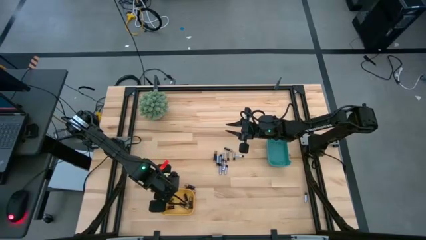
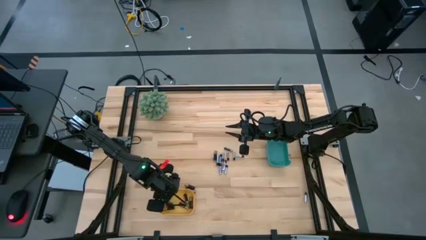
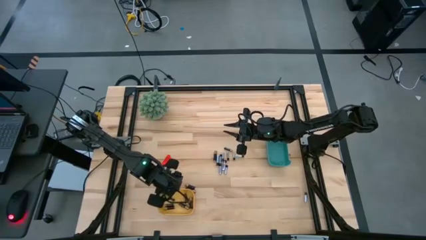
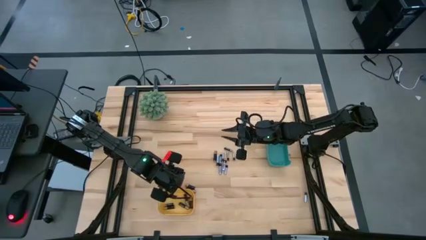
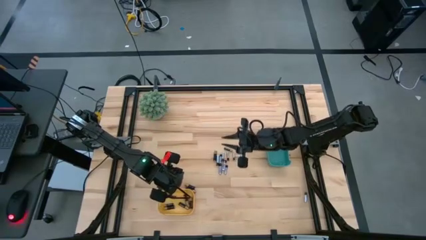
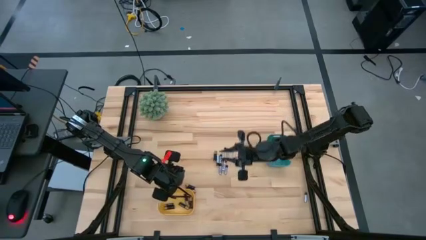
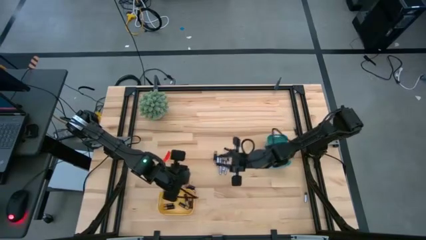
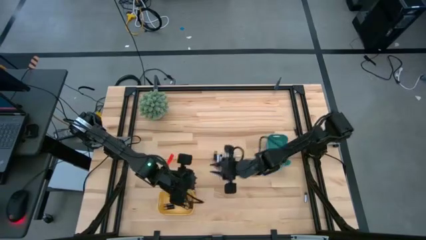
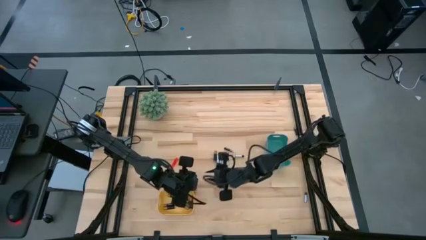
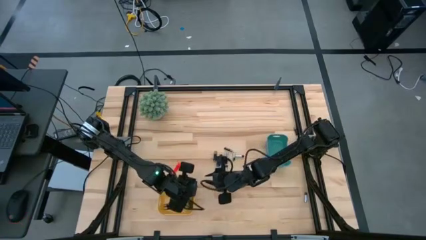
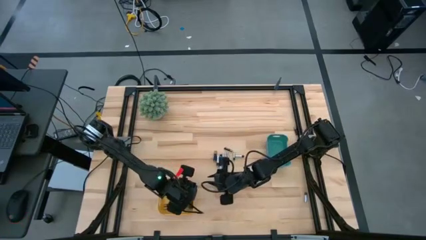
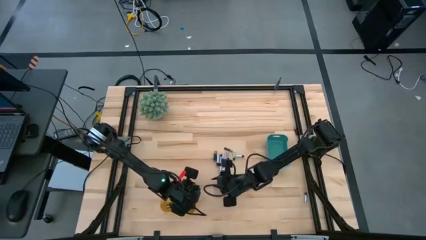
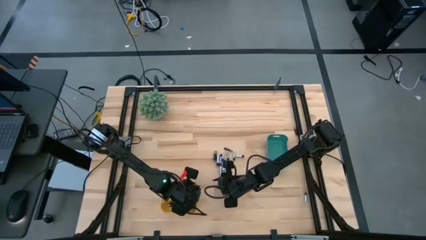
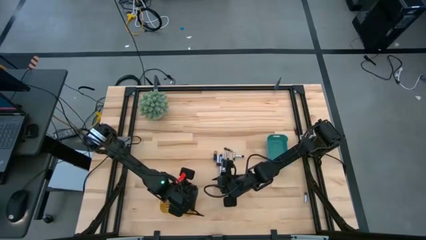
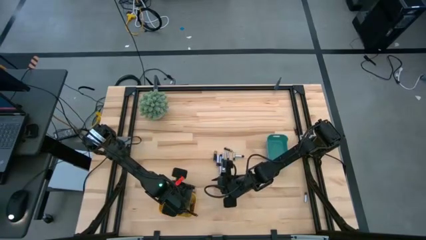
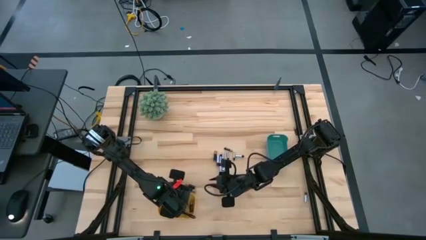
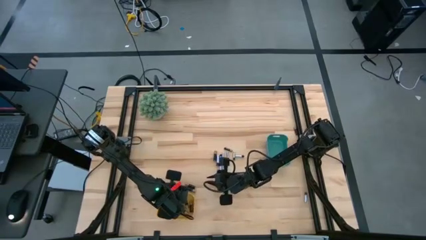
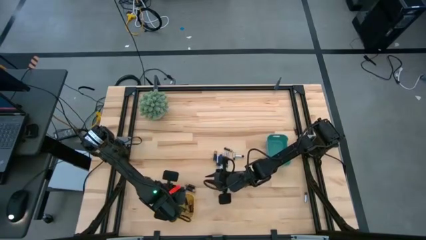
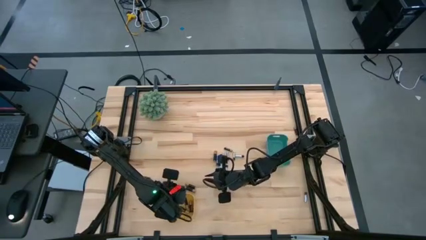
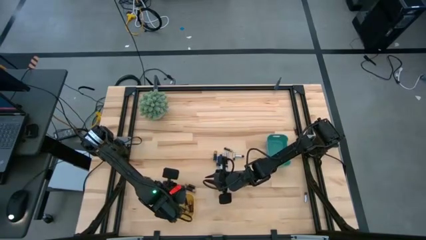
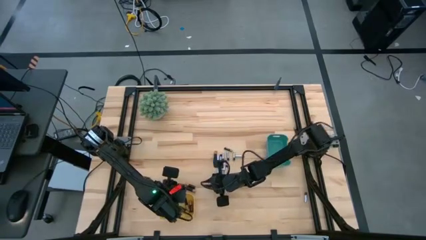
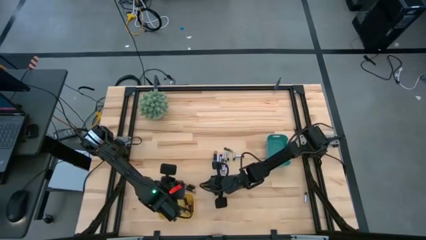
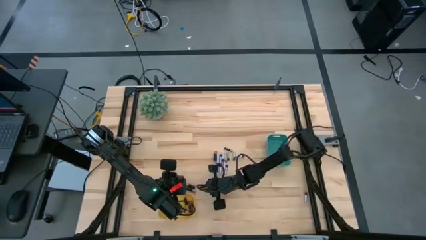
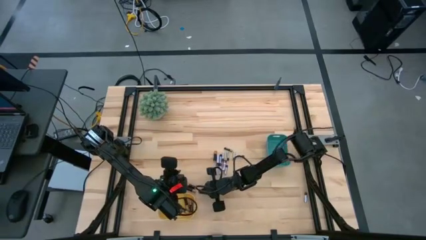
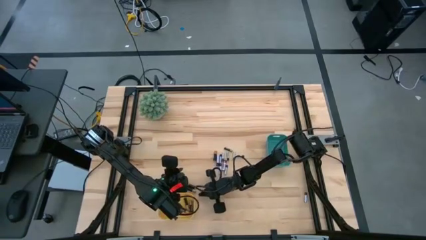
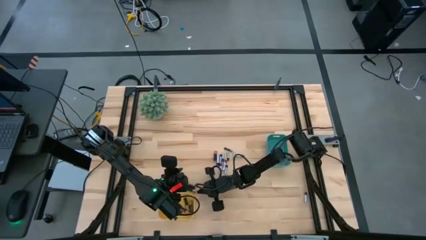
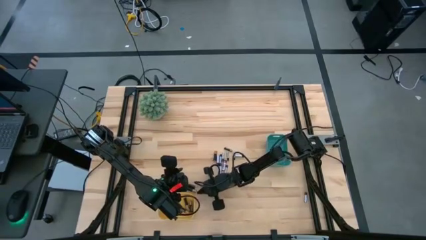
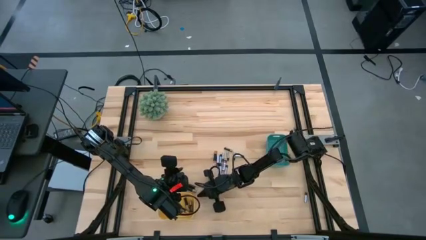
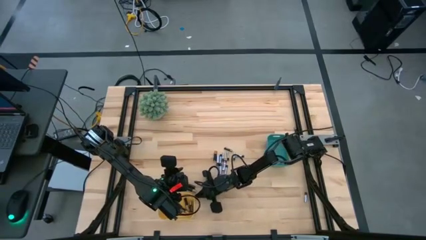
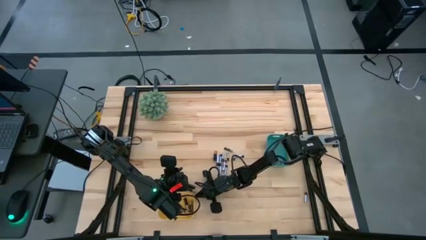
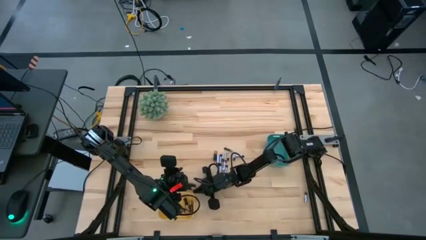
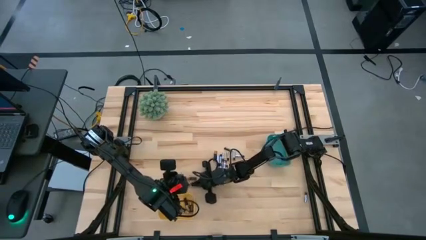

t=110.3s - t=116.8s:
Task: Sort batteries
Put the black battery into the yellow bin

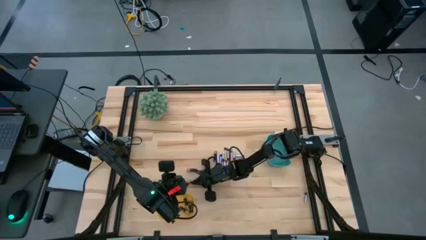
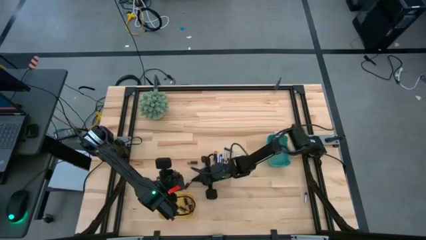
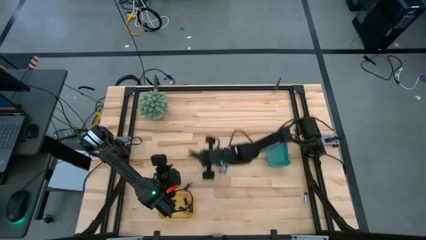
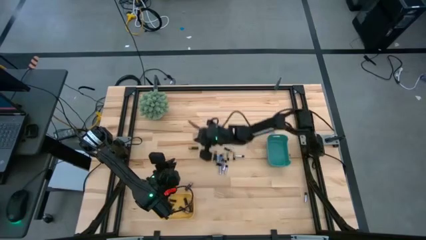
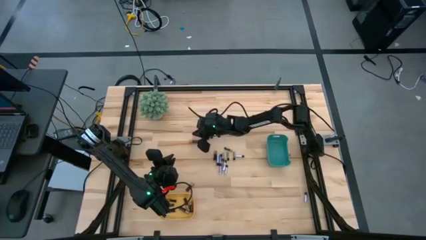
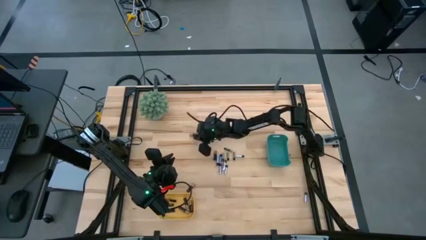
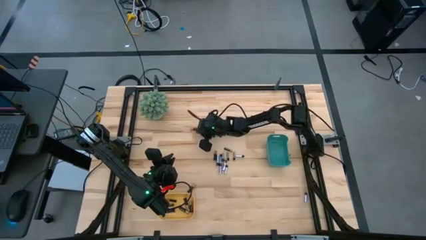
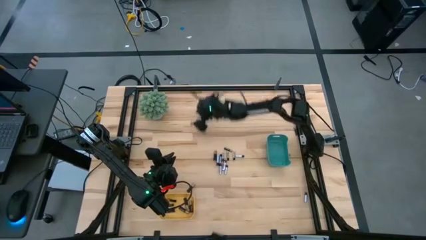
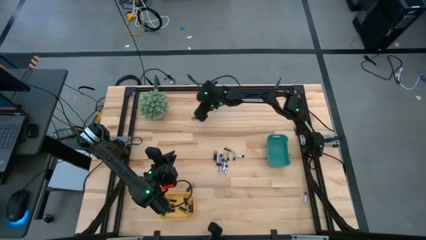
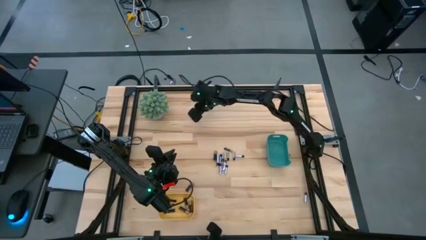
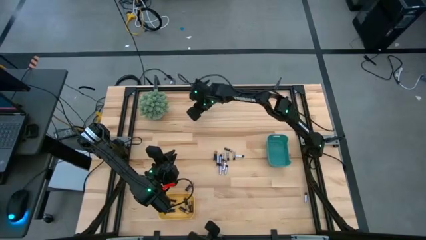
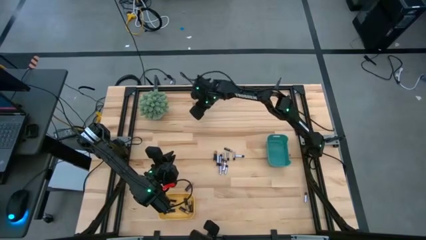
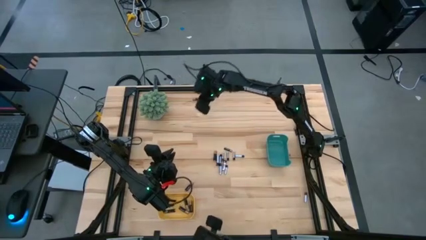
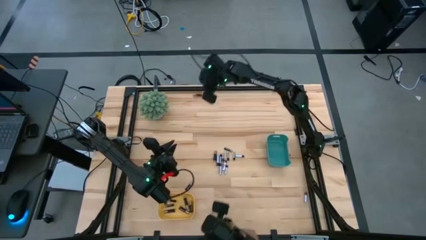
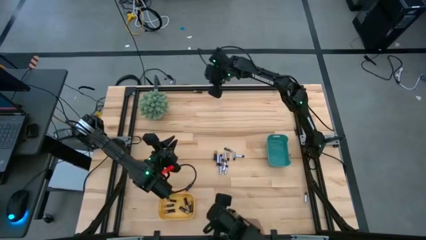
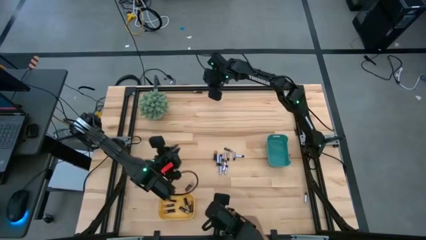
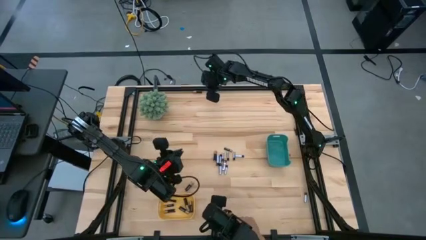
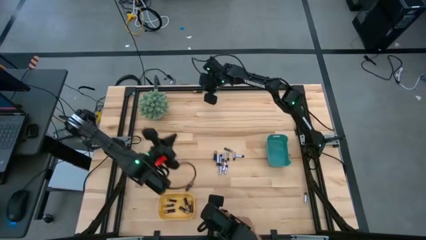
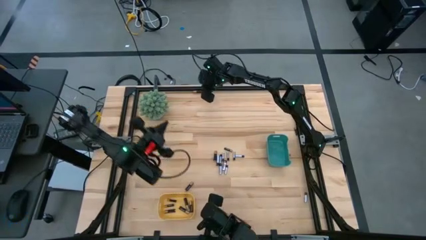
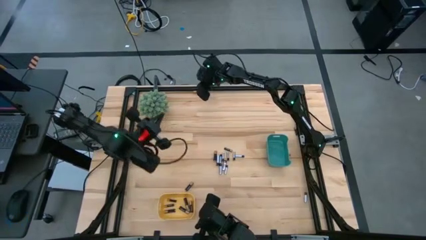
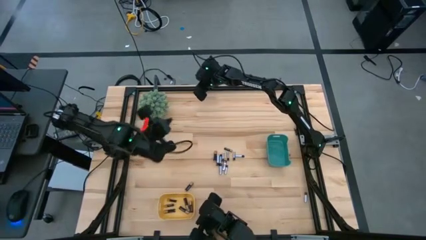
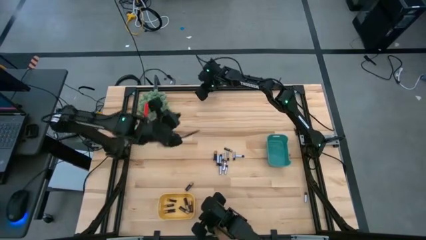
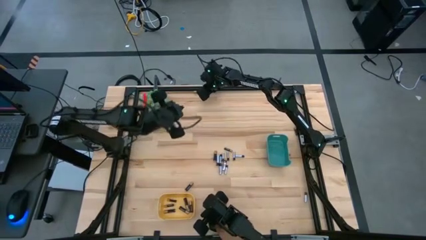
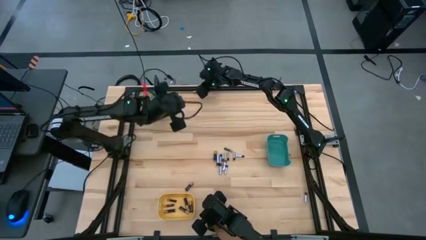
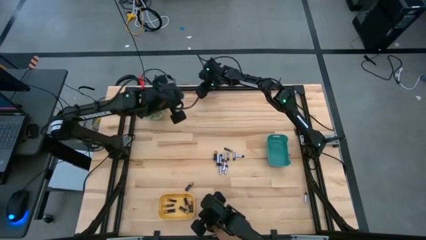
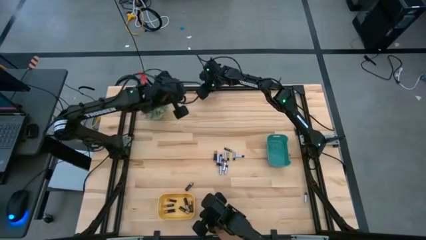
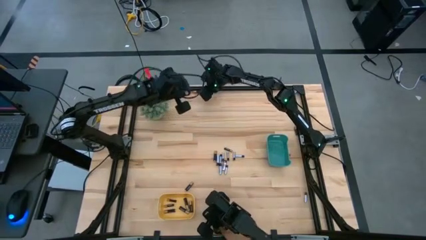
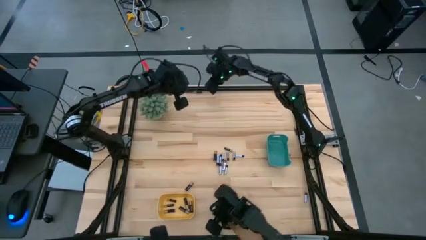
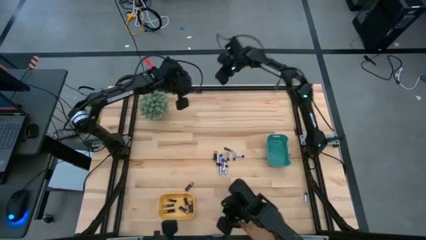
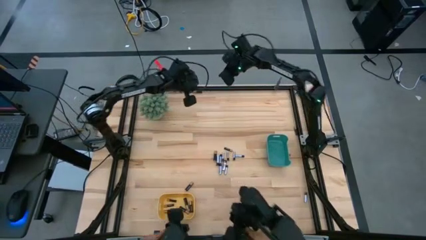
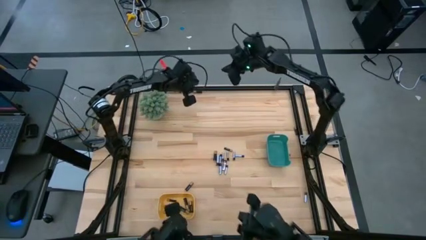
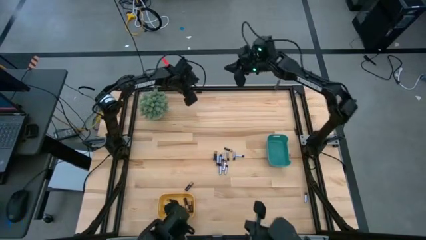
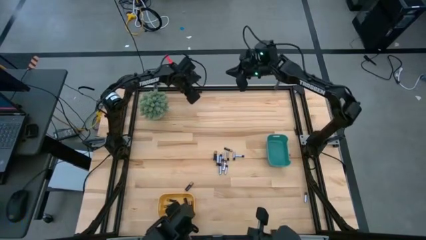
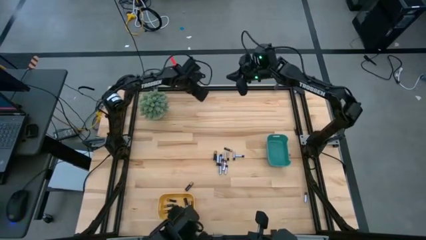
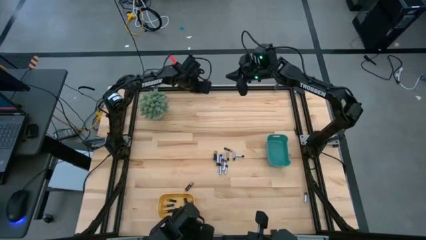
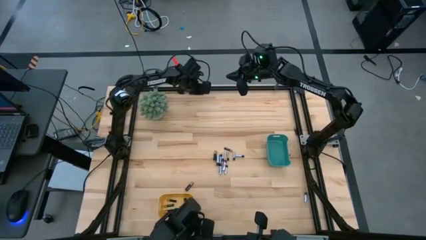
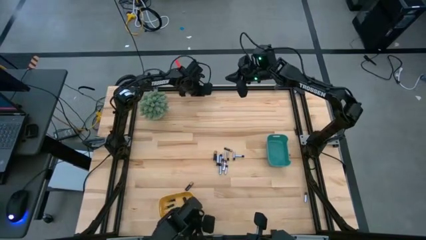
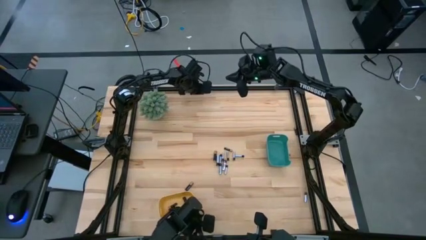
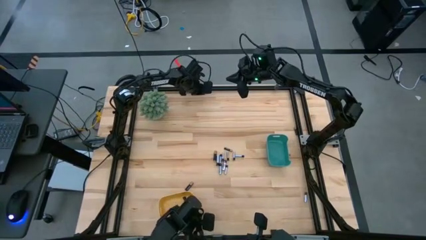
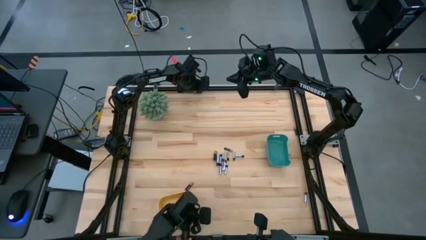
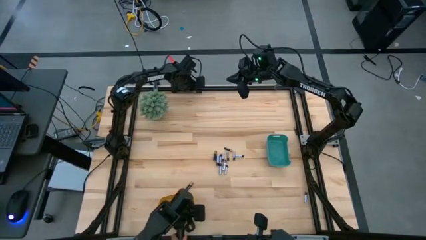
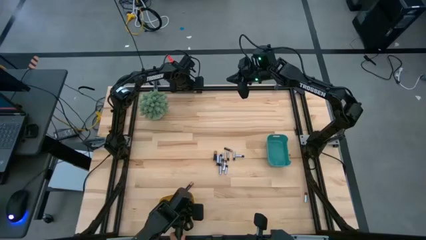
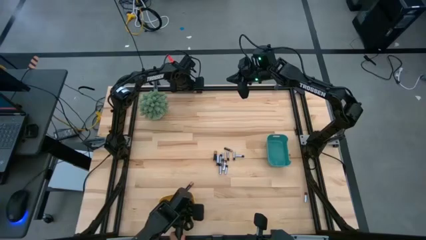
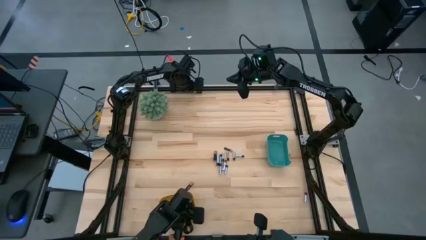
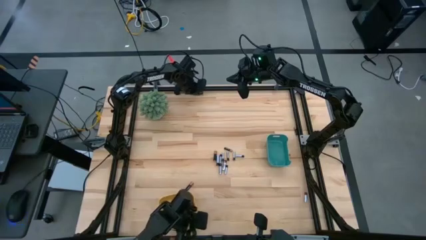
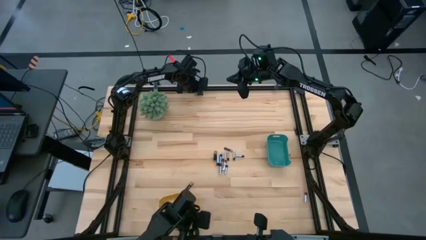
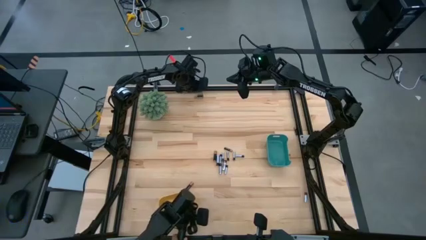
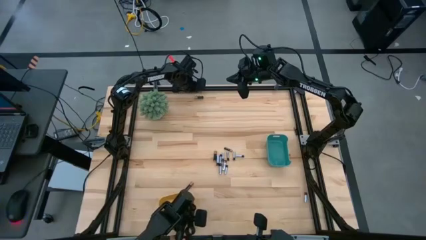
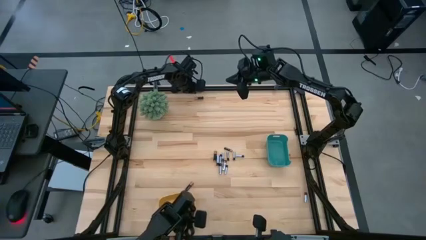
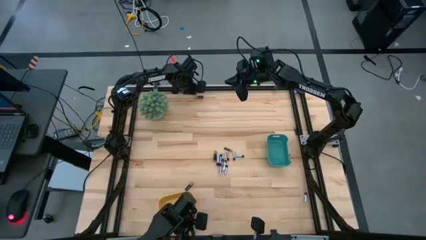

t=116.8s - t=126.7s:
Put the black battery into the yellow bin
